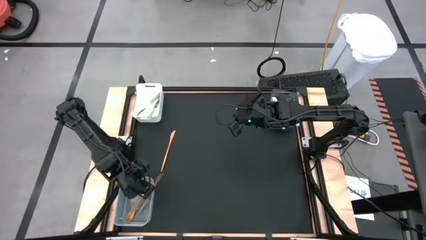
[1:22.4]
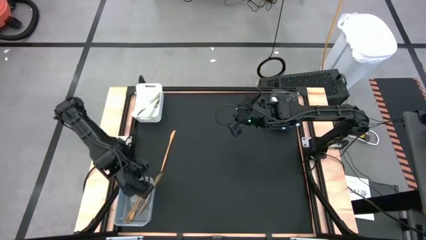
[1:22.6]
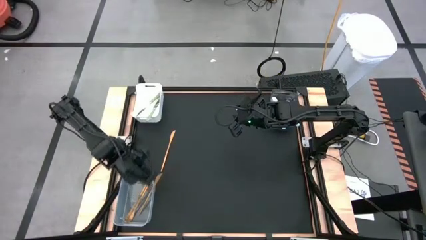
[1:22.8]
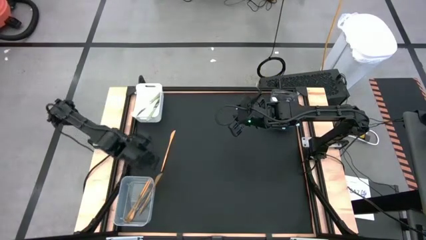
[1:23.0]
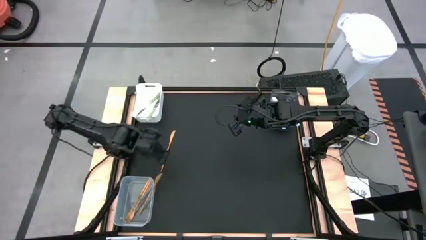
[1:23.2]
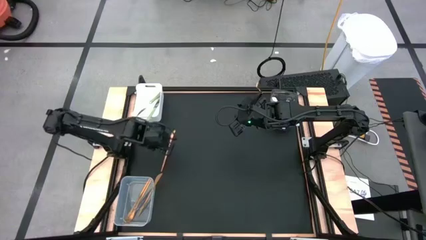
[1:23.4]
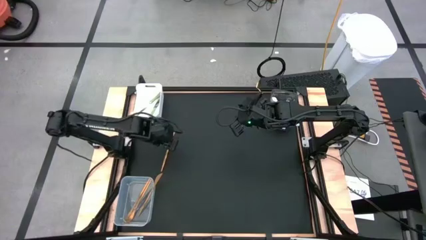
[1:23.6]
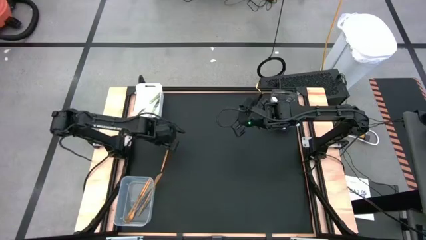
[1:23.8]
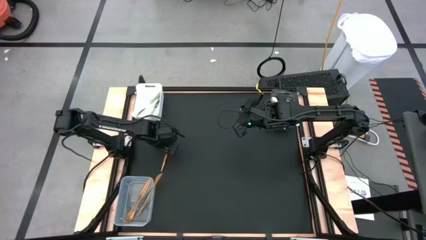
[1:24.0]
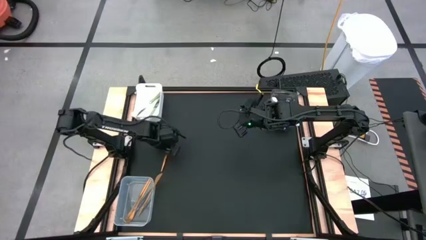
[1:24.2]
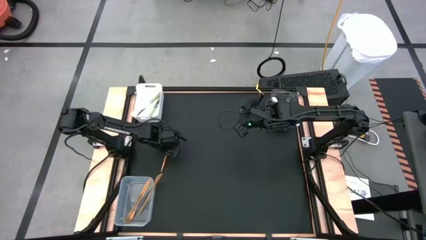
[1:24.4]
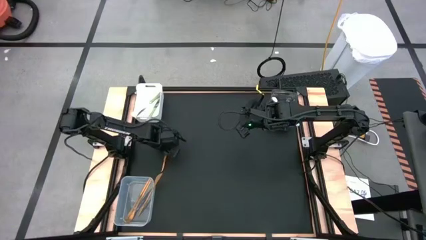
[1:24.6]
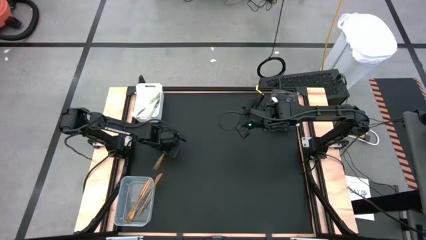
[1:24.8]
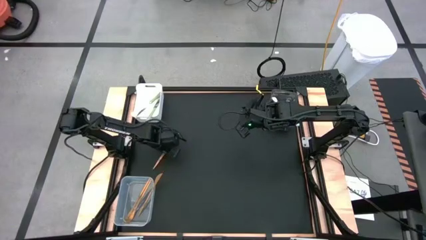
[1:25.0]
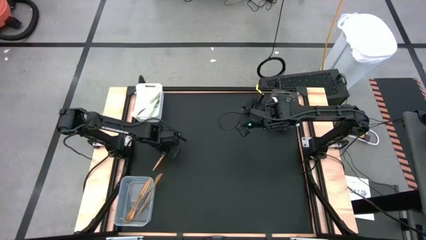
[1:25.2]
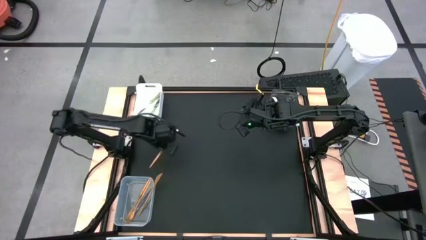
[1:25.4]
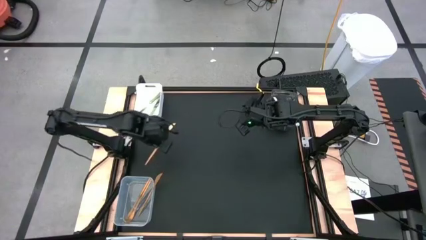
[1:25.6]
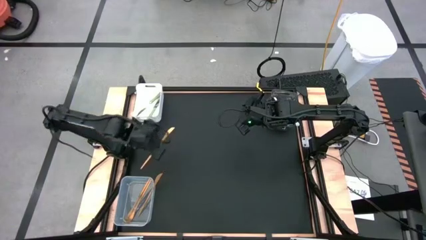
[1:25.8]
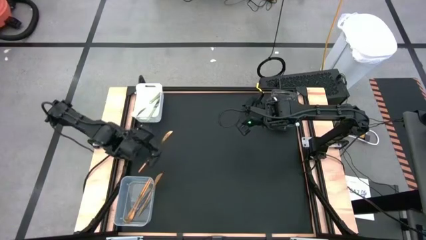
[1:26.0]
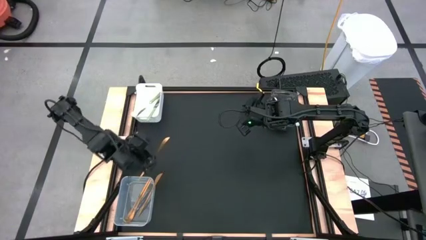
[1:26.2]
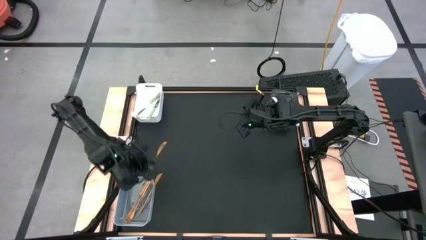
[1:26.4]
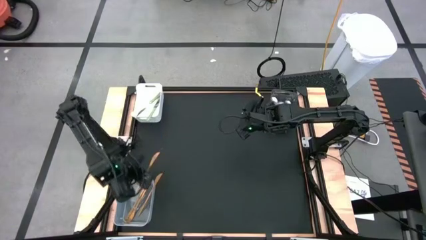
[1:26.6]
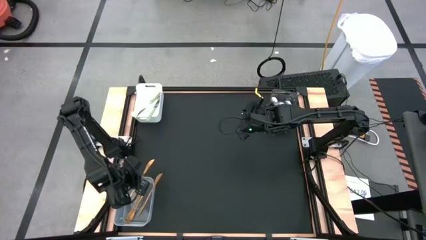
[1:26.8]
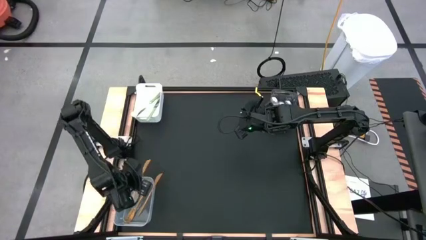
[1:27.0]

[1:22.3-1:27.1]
Task: Sort silverware by color (type)
Put the gold knife into the transparent bin

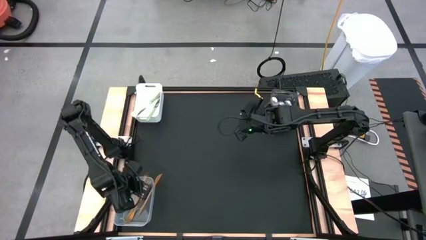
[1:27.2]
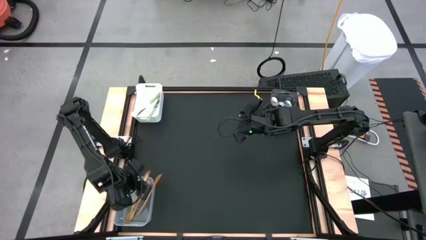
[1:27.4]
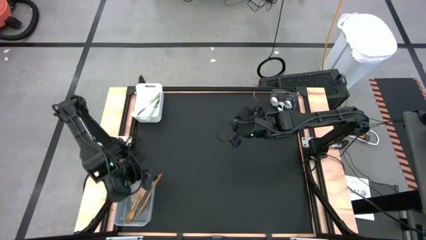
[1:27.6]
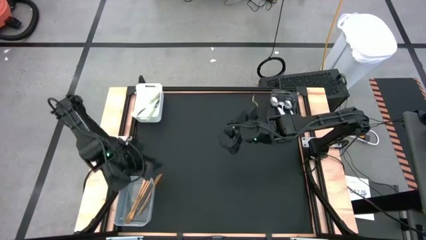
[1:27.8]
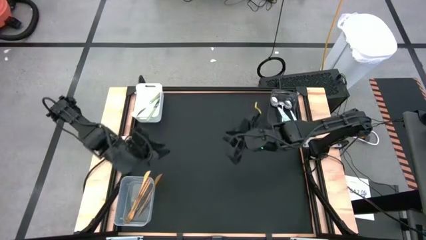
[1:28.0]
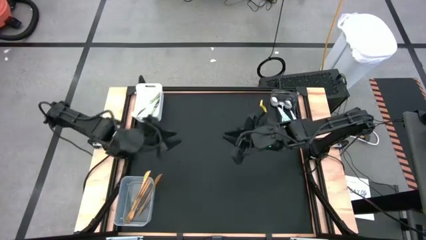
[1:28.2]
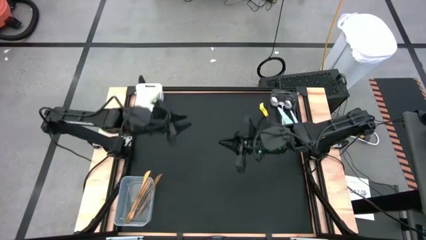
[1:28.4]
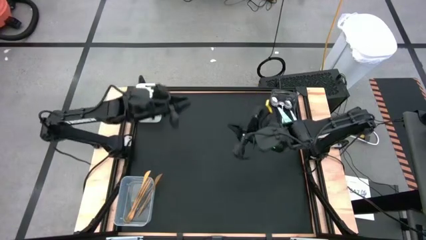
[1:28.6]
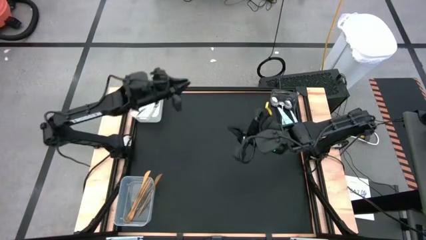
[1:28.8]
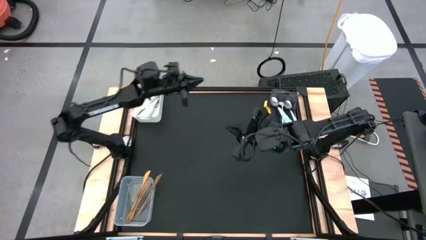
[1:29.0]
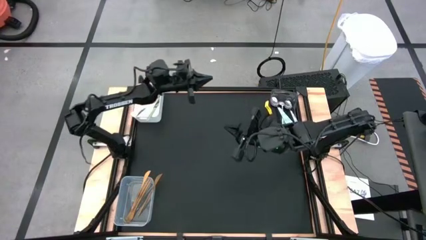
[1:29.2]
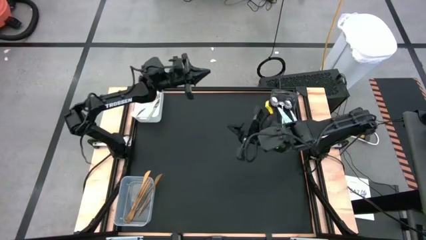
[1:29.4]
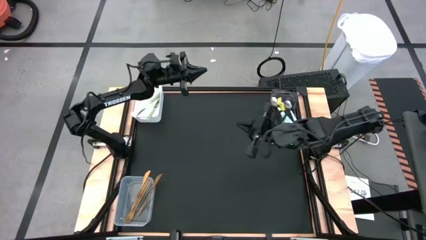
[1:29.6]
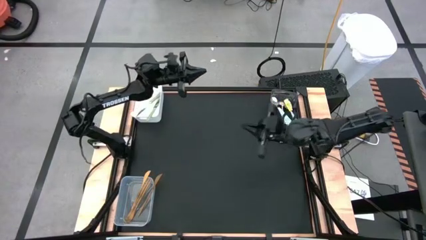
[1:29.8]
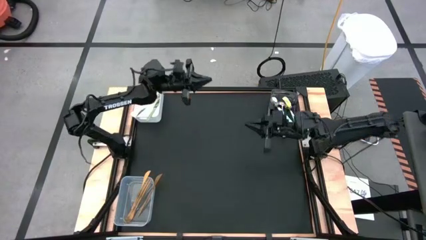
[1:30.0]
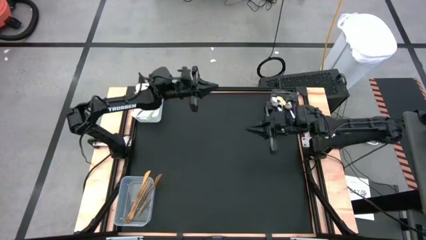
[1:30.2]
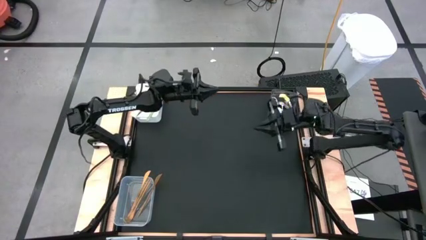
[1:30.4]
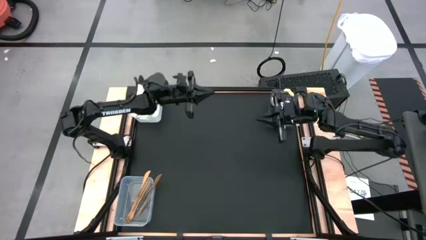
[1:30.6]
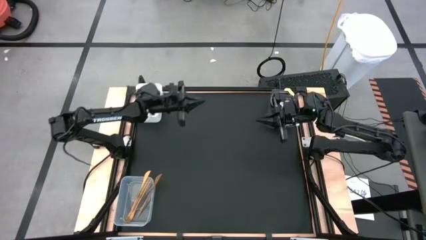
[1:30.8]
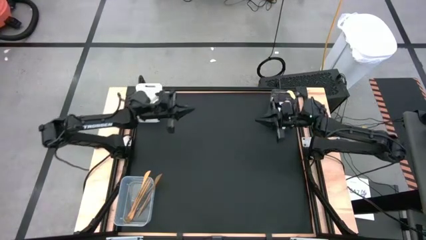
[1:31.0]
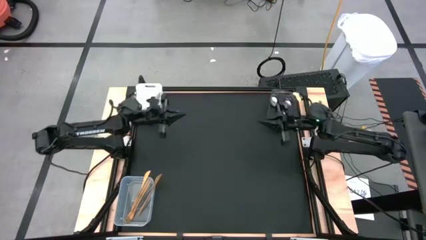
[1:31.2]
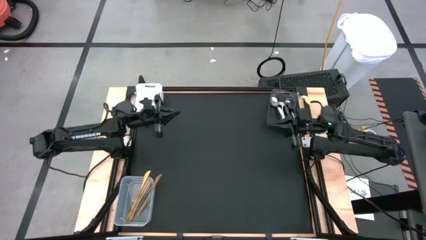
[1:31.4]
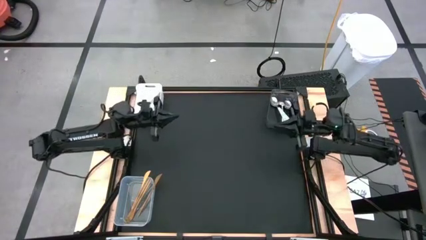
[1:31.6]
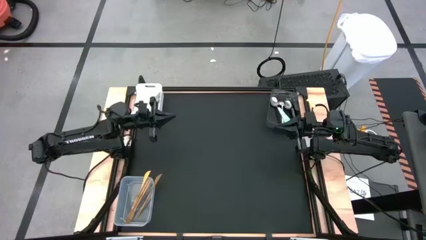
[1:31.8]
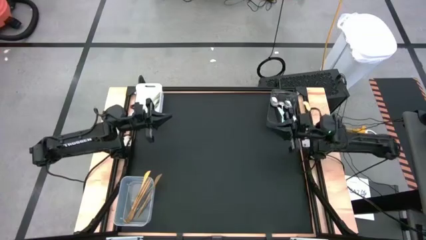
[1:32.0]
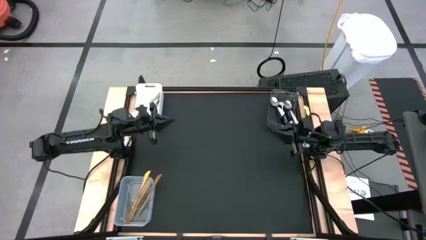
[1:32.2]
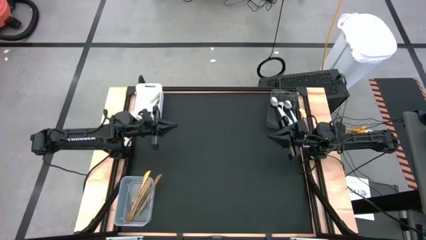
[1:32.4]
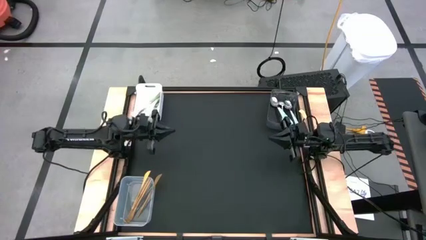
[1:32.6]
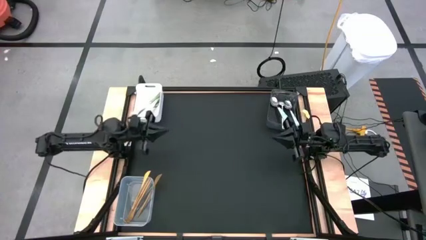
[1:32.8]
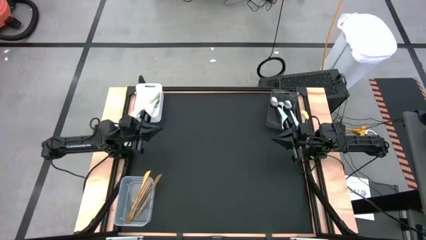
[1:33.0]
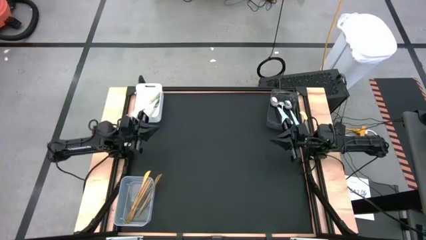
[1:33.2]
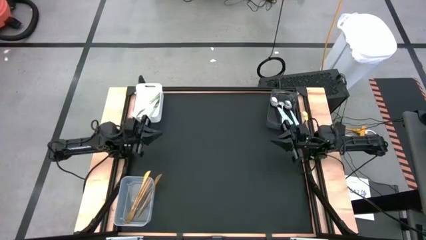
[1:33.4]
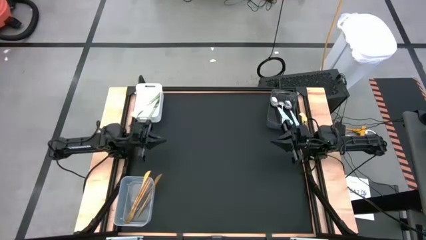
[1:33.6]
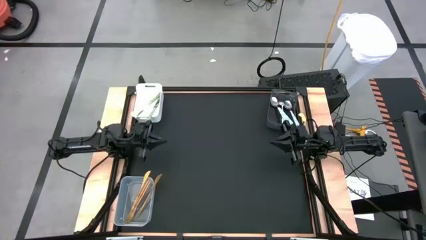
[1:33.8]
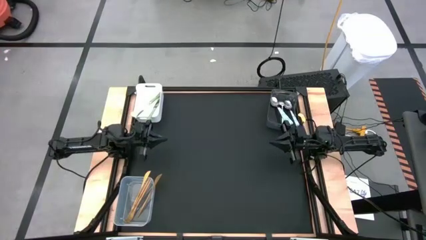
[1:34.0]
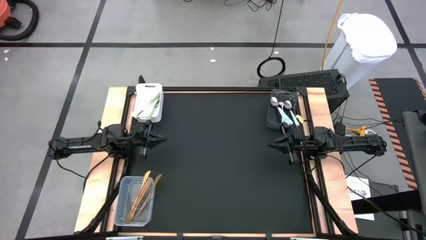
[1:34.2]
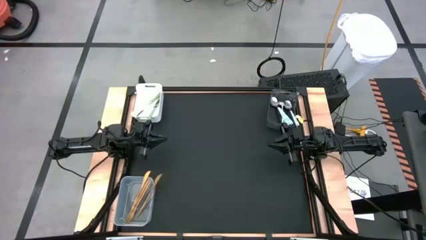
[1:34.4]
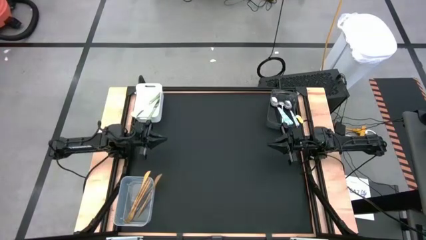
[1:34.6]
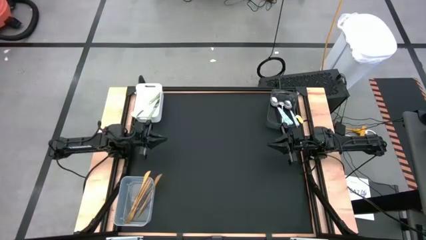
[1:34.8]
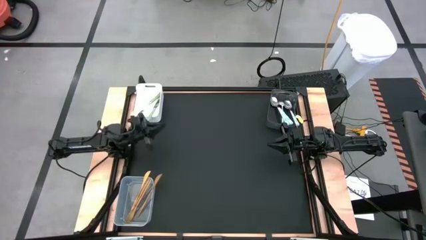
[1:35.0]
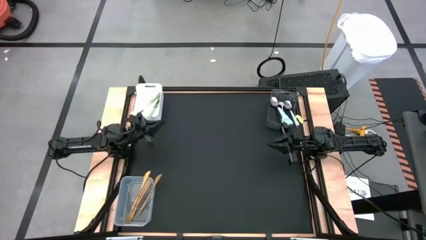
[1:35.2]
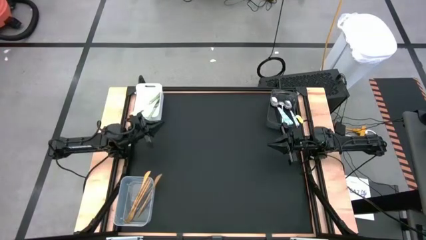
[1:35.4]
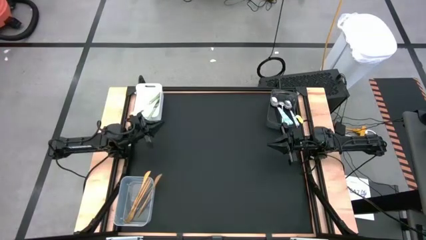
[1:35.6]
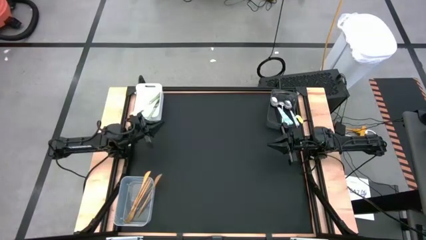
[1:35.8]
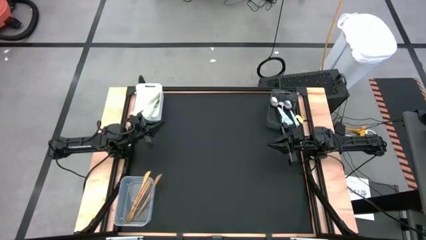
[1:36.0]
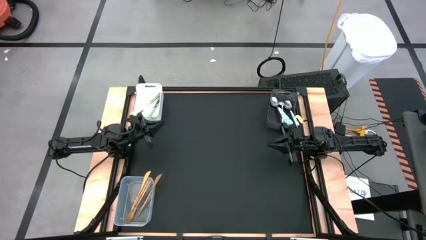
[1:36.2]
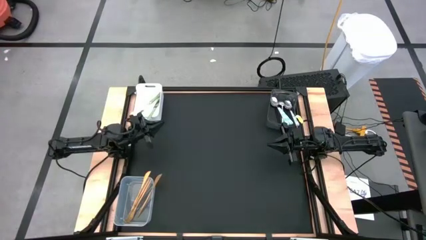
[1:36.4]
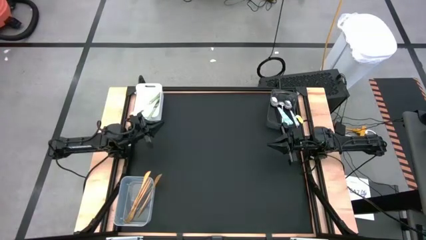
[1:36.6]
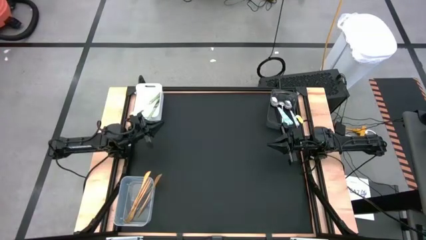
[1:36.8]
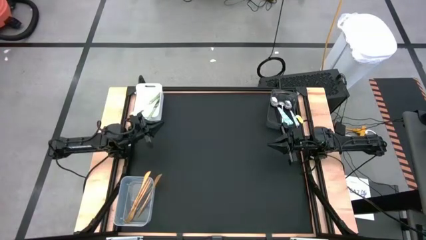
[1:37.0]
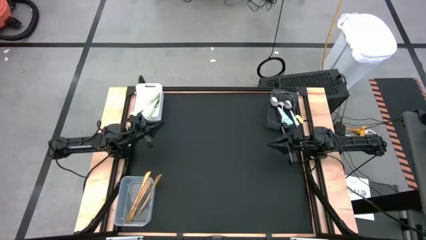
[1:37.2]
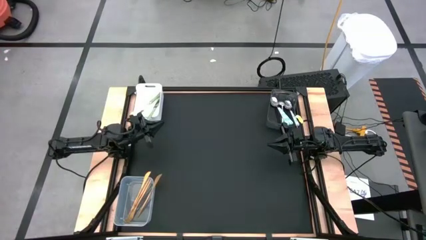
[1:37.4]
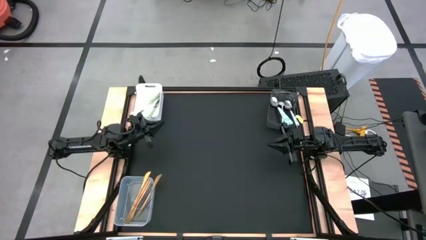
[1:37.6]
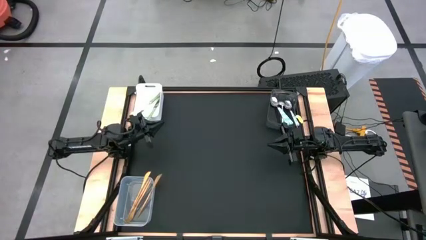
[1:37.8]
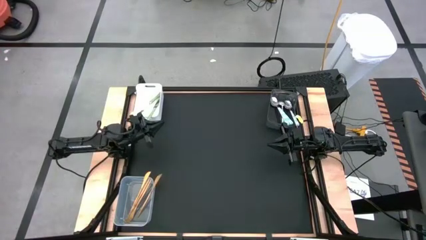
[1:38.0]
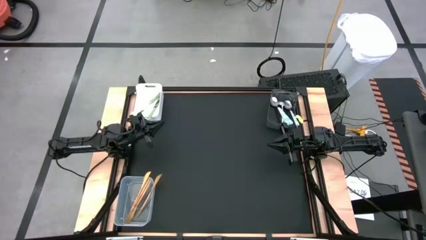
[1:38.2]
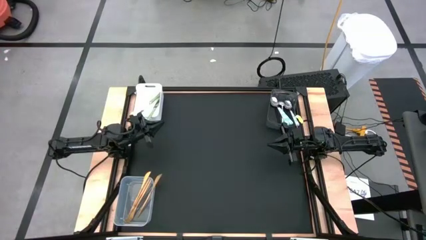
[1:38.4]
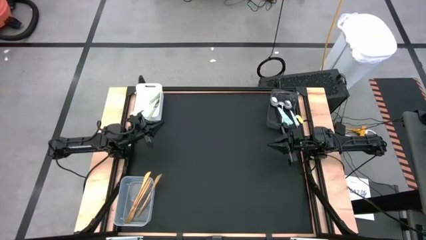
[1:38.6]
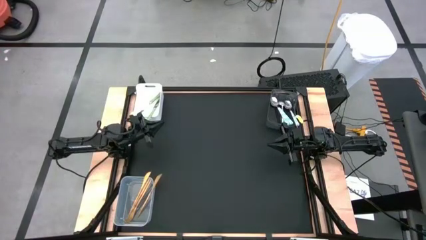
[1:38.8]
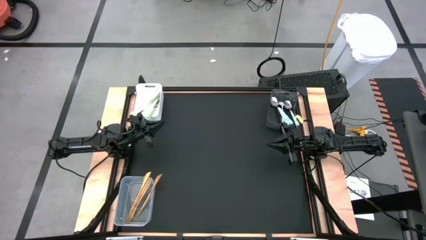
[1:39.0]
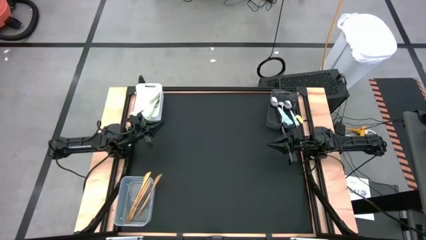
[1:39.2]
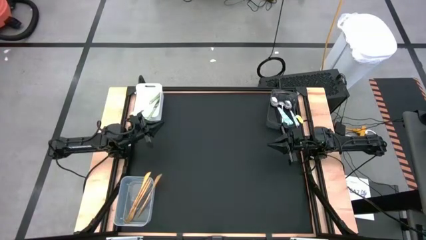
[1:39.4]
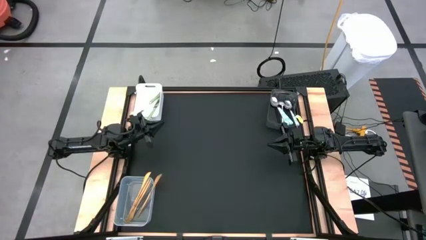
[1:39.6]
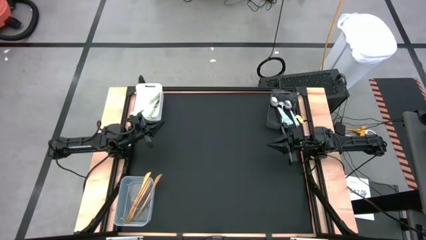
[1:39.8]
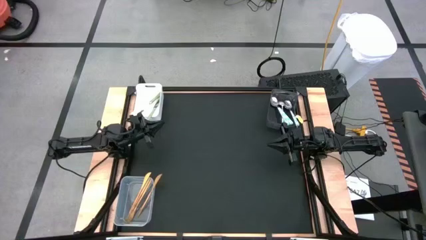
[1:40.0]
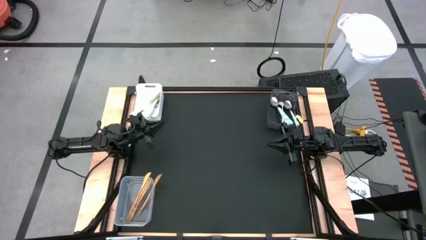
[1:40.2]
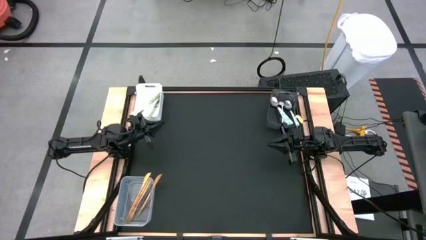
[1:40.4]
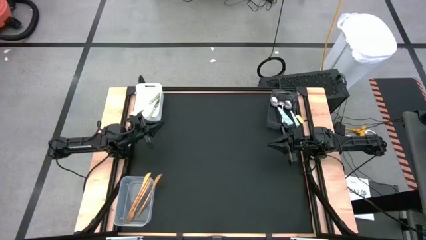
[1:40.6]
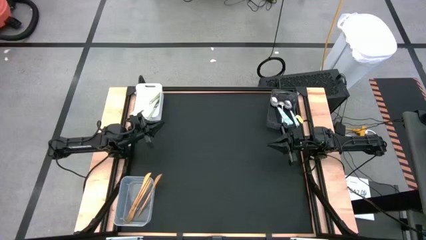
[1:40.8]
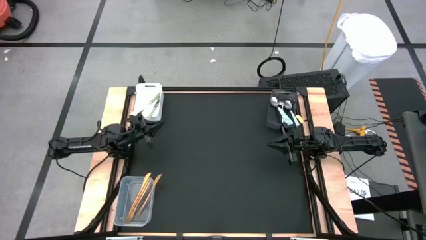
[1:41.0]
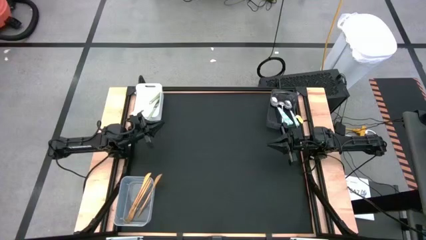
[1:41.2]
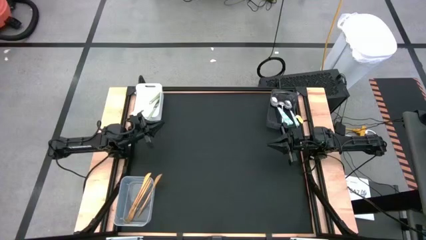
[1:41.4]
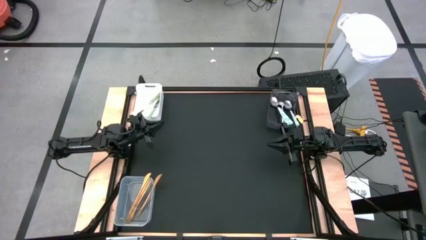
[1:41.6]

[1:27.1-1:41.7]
Return to Home Position
